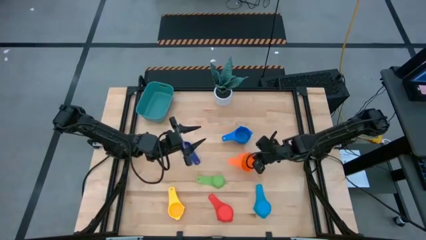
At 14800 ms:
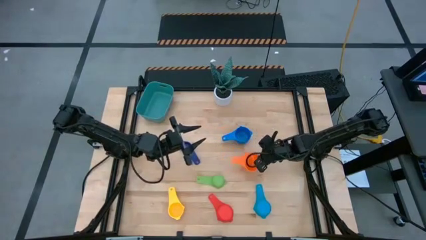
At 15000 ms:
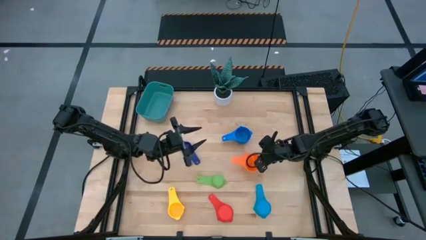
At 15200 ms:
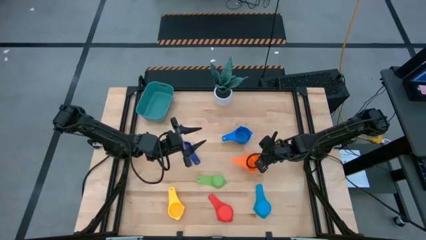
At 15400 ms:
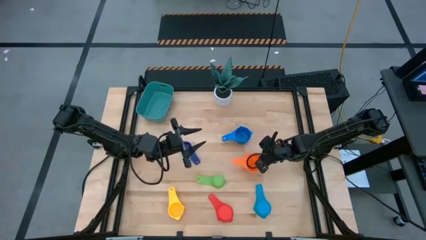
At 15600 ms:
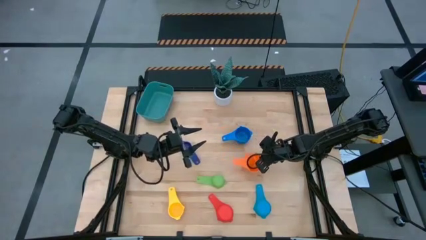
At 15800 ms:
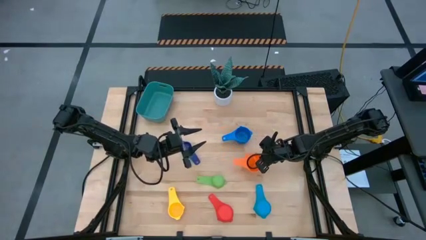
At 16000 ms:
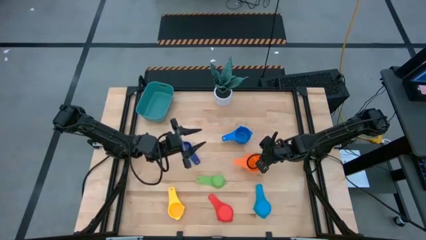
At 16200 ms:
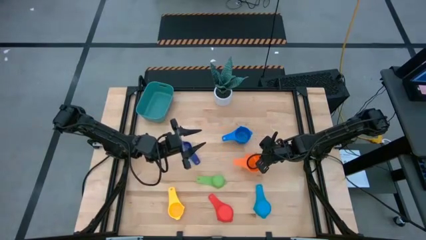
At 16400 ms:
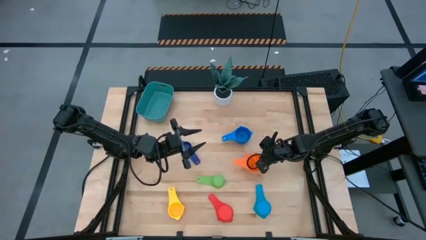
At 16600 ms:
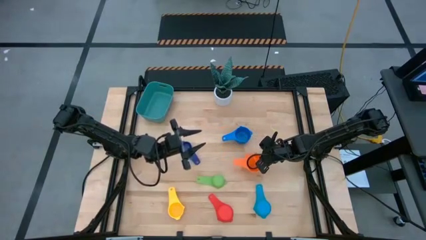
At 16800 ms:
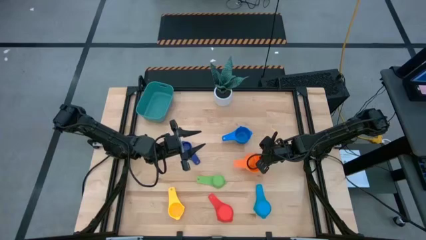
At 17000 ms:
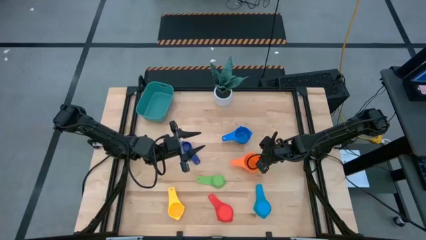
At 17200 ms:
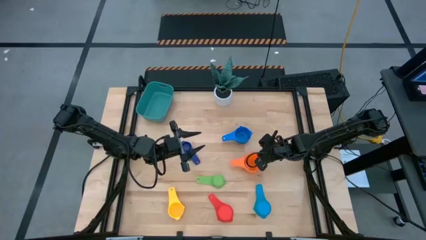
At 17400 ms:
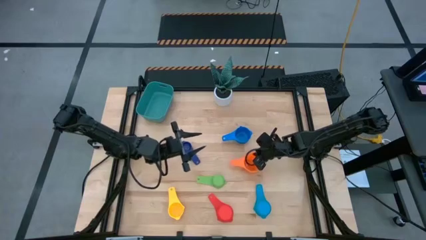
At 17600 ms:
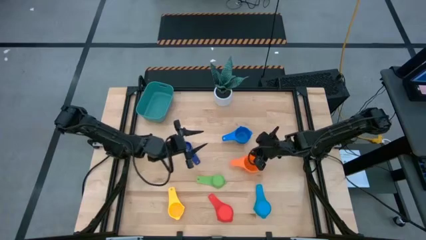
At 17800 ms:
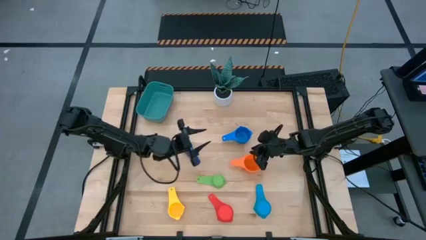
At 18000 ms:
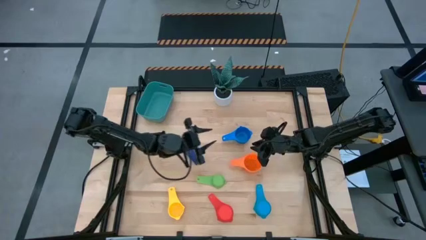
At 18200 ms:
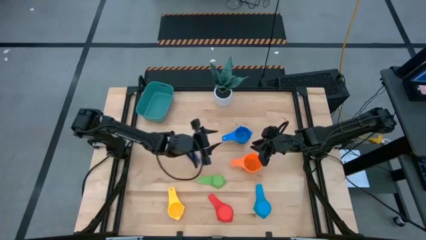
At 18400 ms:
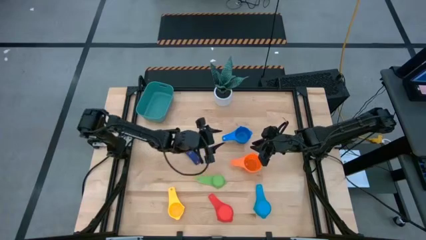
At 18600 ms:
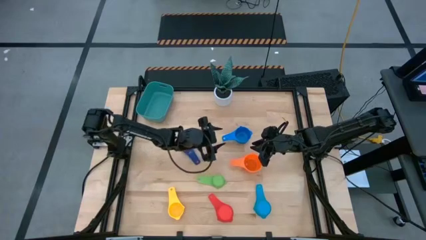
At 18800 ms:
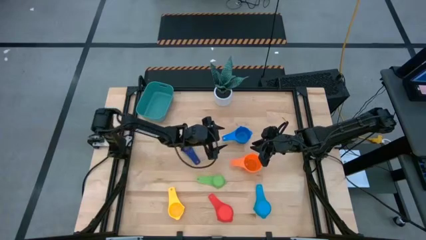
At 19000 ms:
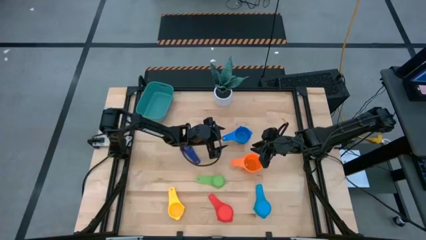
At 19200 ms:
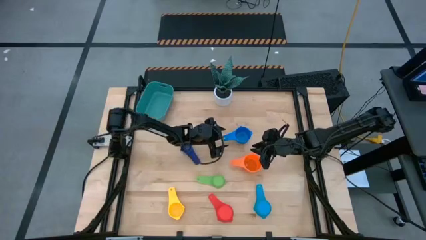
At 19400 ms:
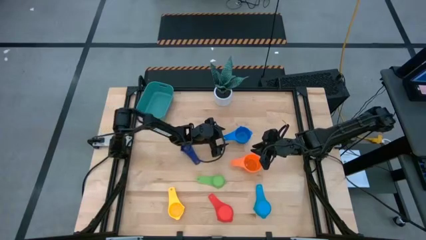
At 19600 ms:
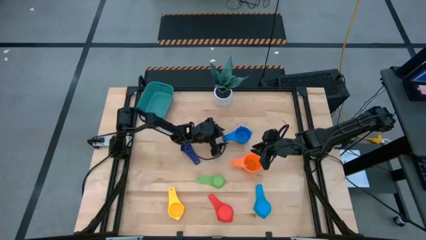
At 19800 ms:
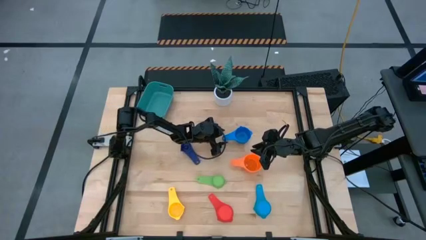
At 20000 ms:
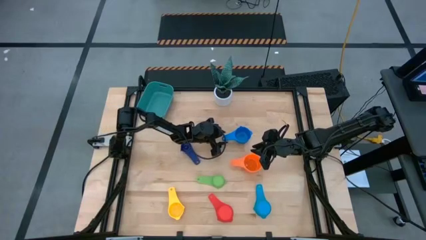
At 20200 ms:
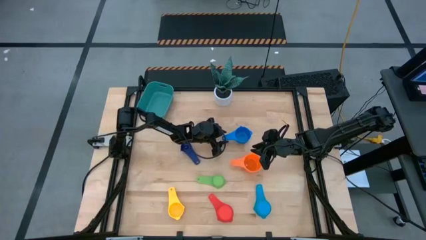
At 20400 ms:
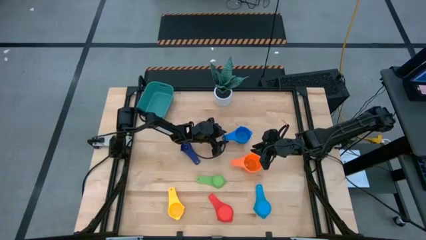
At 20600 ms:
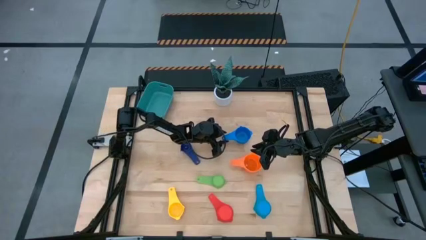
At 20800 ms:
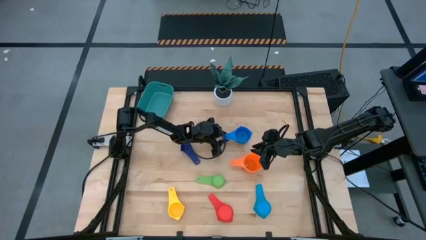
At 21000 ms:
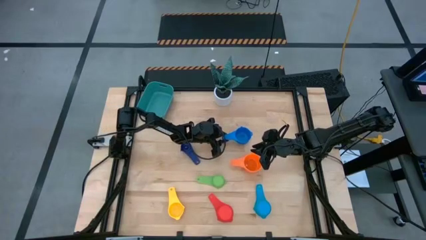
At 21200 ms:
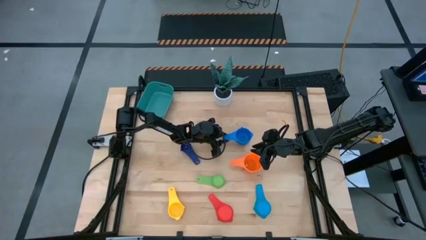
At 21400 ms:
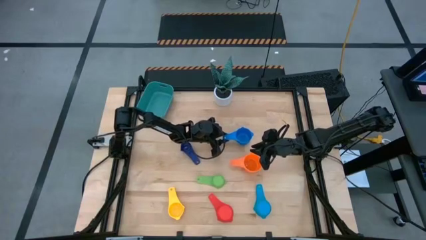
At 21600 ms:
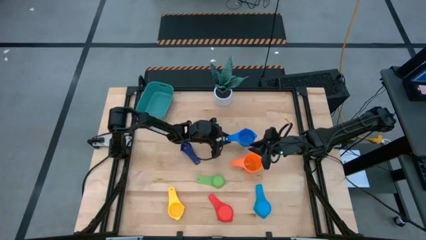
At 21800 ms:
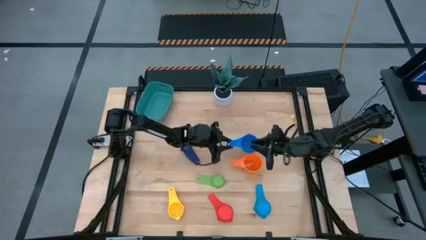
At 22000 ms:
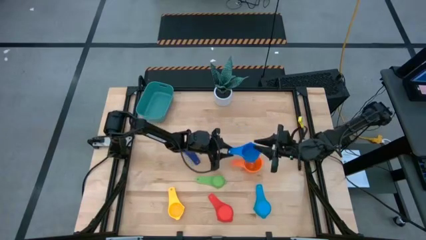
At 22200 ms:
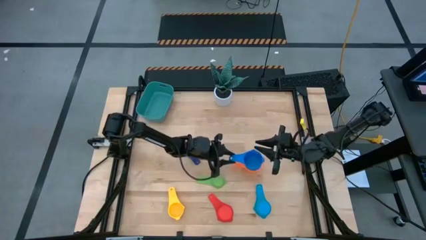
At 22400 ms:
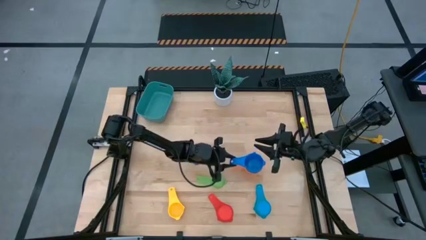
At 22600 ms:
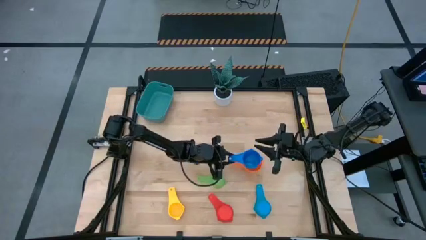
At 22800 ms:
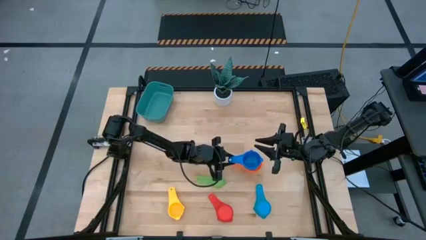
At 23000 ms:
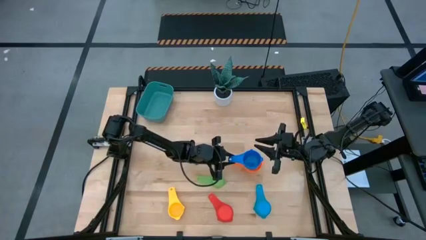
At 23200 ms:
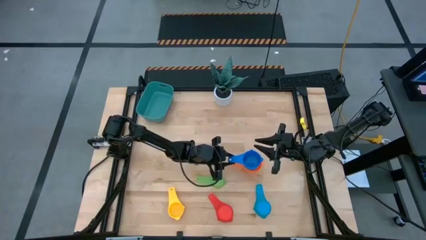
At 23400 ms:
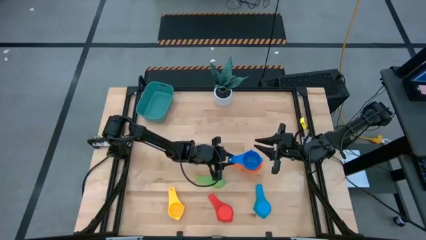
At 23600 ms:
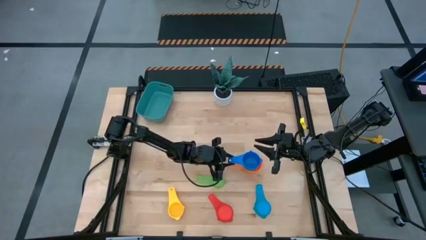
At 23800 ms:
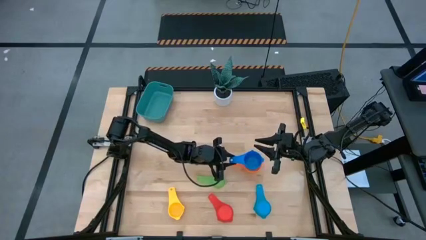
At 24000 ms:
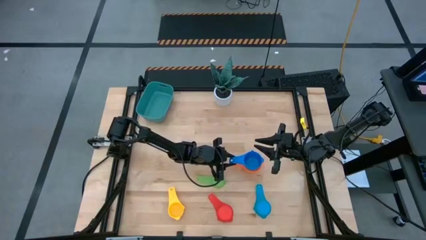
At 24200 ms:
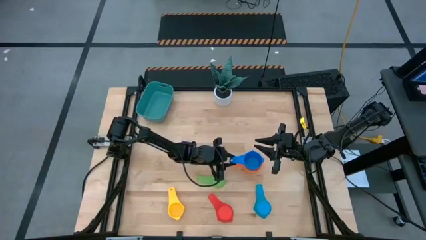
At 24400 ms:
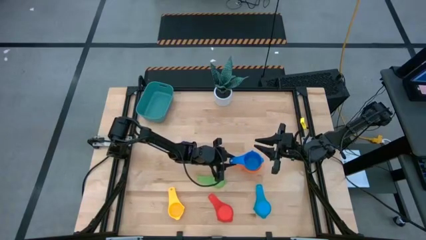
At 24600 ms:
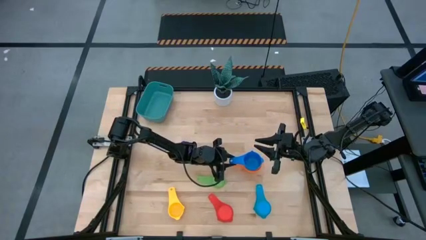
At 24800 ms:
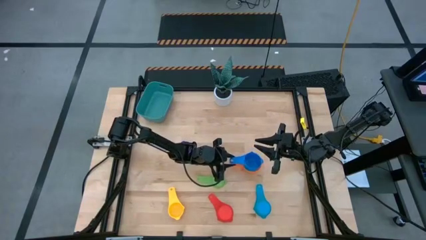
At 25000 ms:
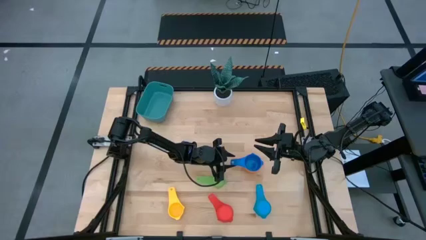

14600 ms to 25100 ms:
Task: Nest measuring cups in basket
Stack the blue measuring cup on top of the orange measuring cup
